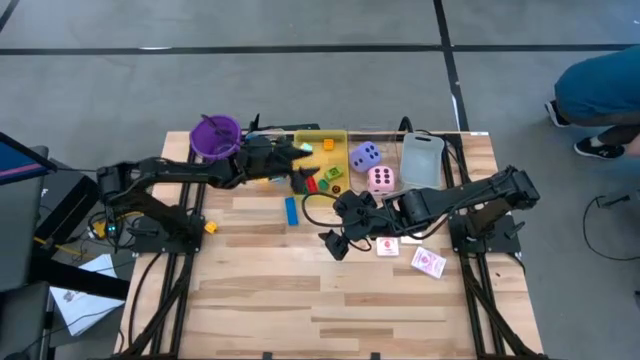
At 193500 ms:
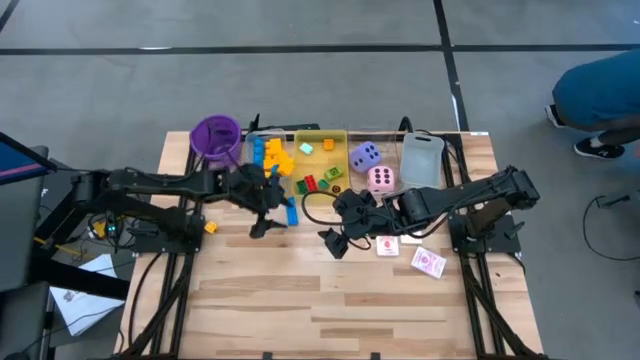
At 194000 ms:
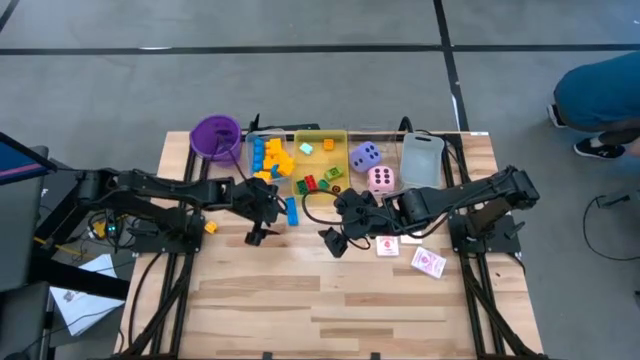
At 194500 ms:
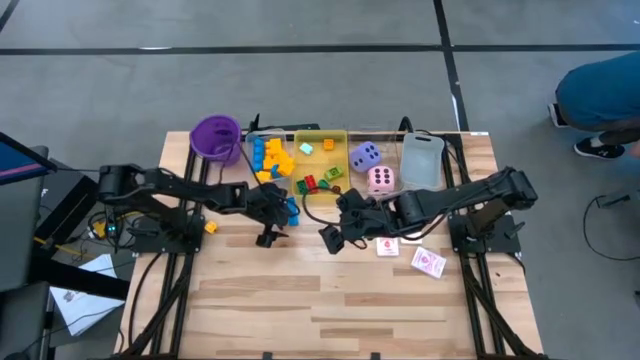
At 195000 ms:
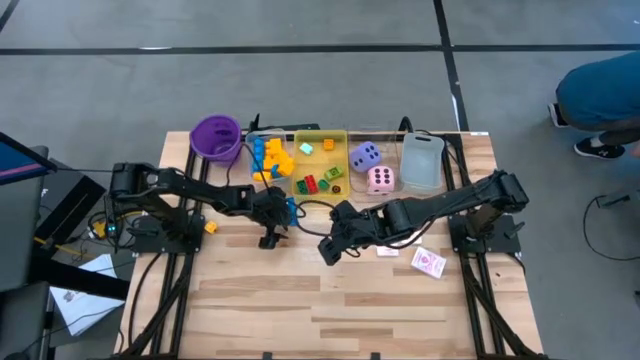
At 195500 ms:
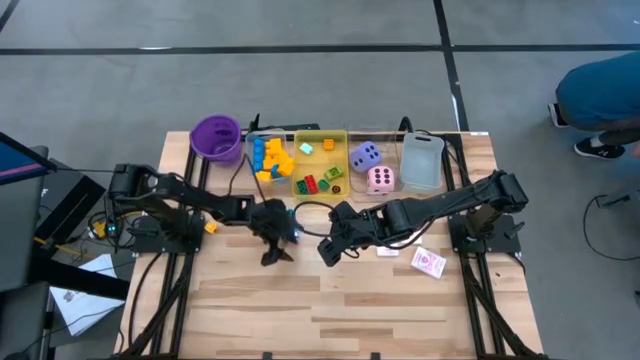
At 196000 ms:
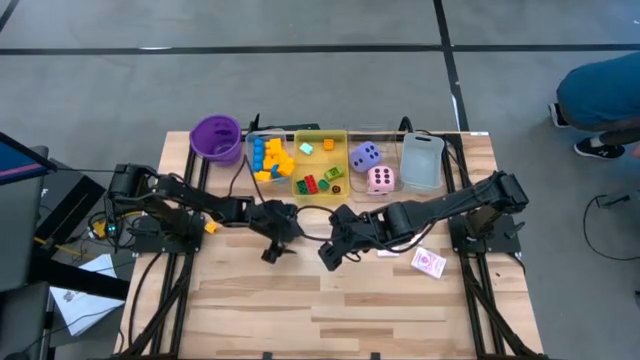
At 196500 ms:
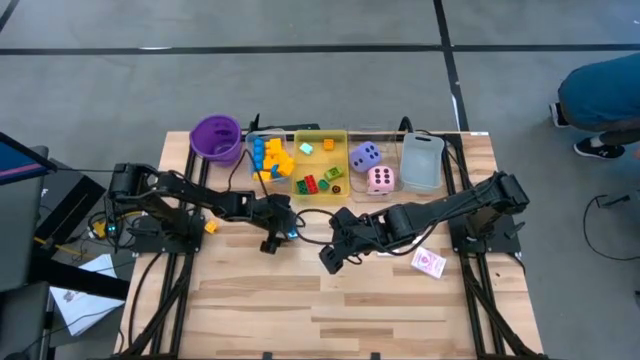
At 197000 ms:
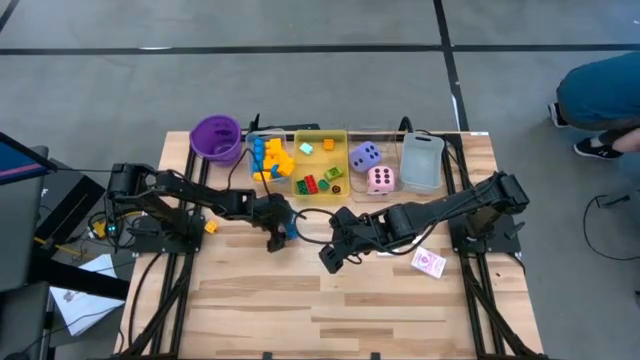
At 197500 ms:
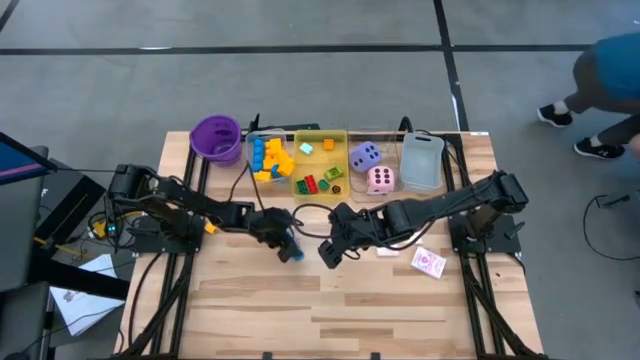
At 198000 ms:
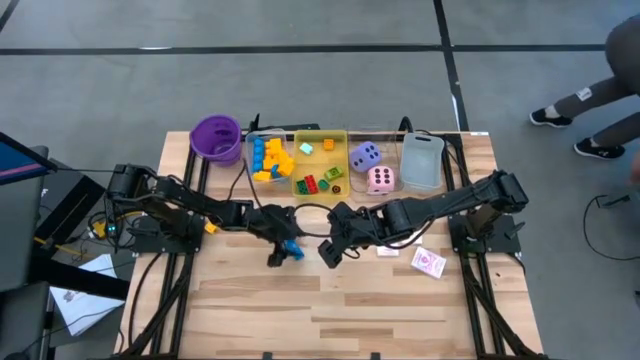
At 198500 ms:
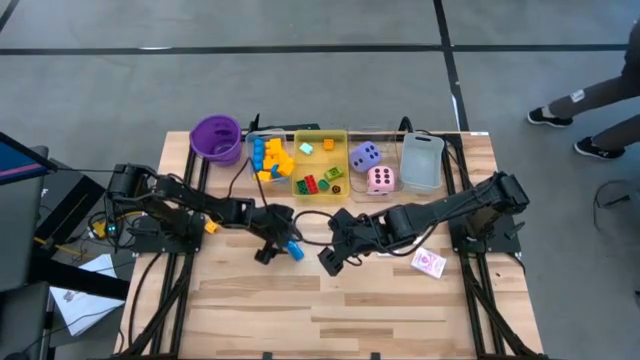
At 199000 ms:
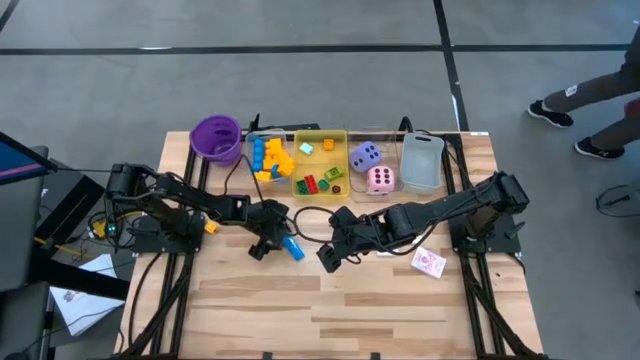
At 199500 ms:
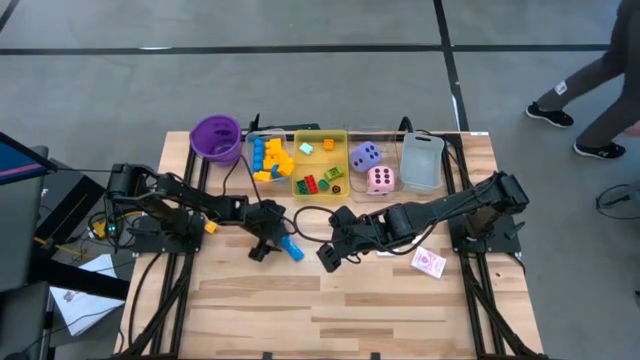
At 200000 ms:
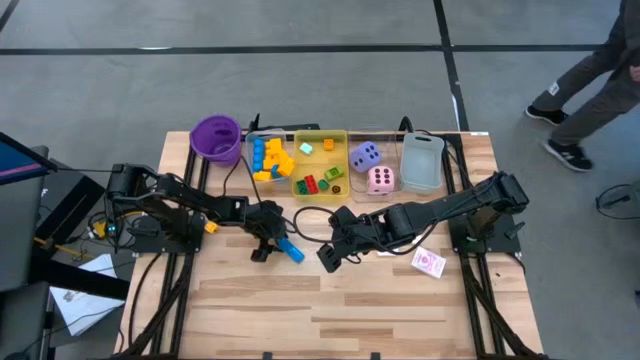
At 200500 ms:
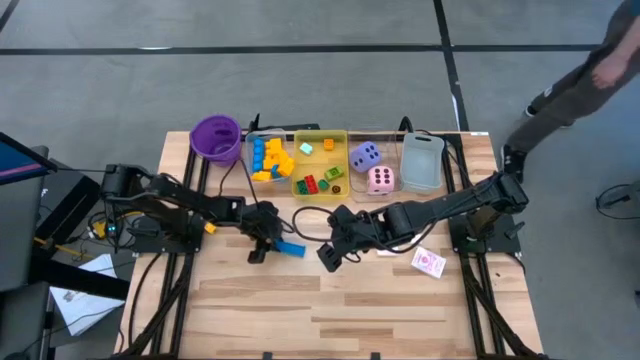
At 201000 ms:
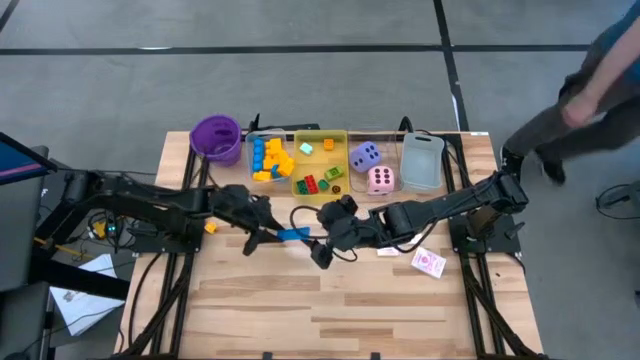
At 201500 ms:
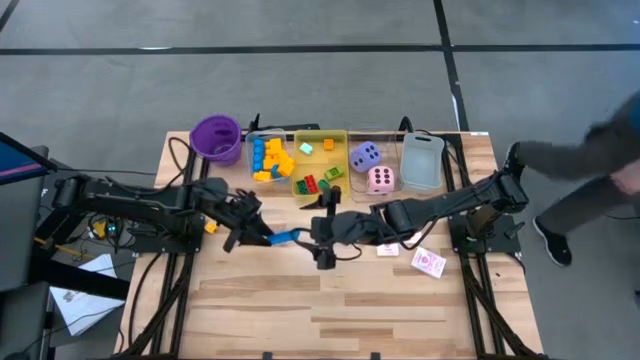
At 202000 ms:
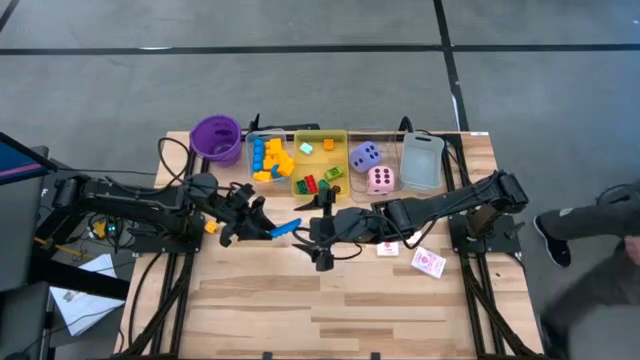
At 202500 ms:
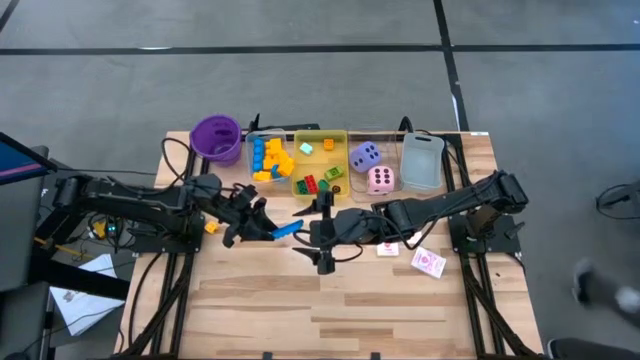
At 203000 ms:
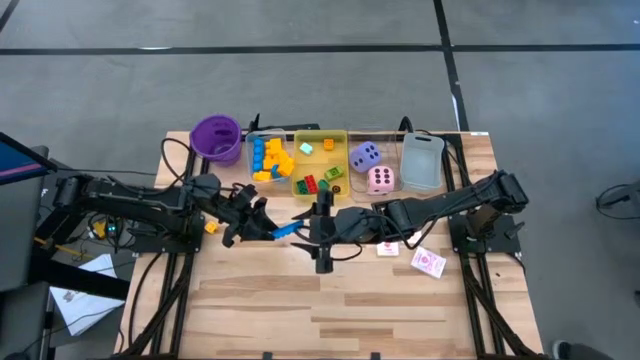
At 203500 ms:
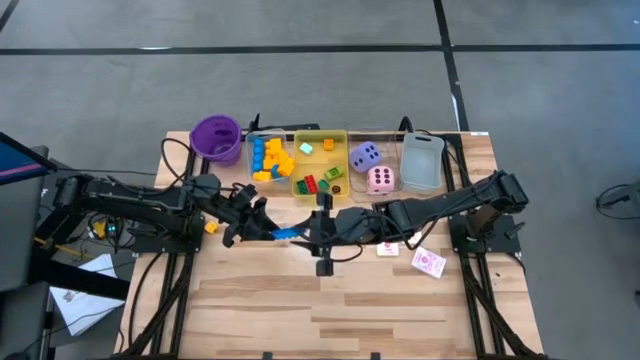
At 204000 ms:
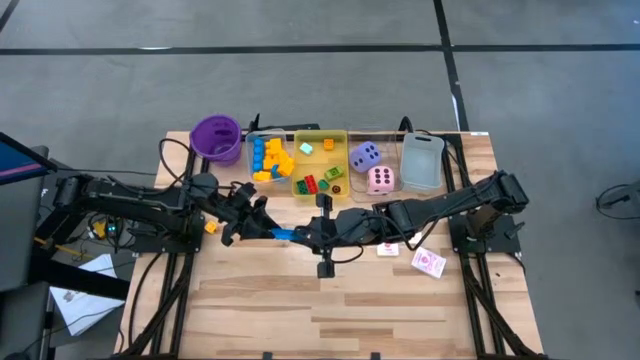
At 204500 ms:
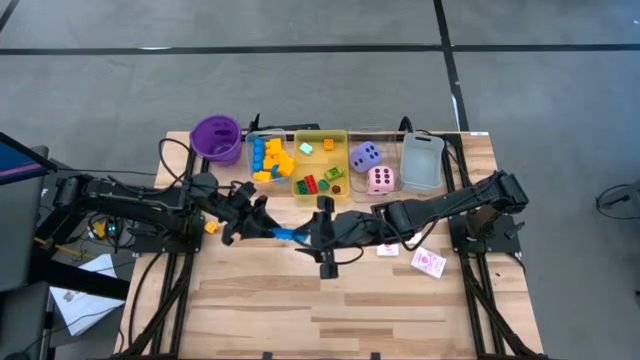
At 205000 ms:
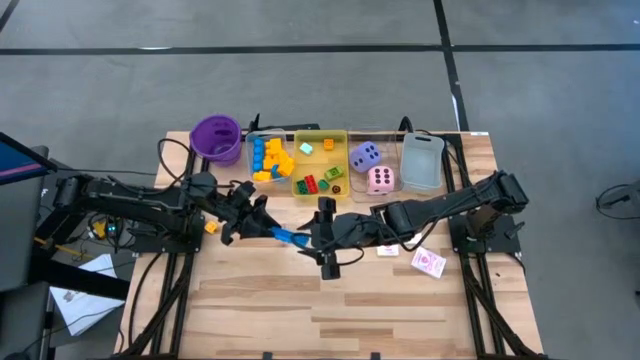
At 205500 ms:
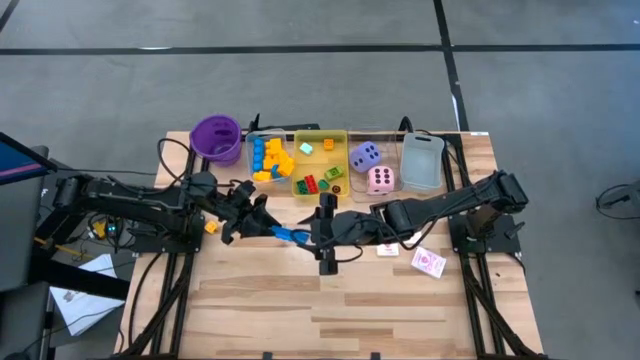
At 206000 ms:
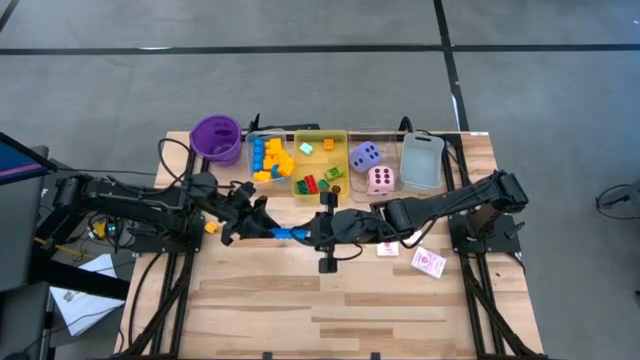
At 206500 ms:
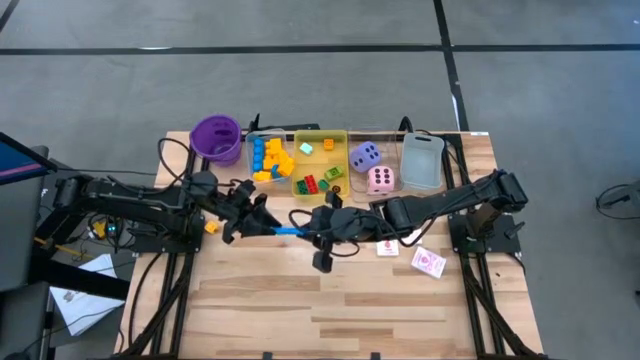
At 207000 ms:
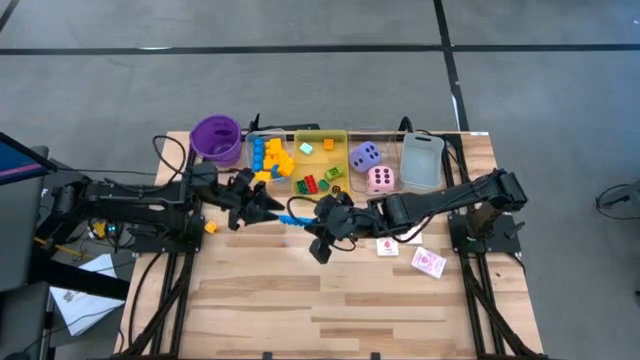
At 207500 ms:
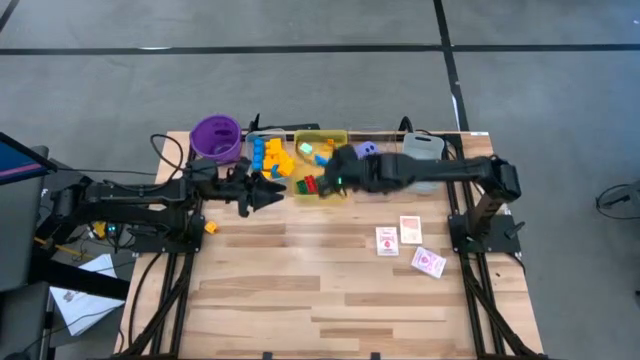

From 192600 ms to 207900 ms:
Task: Pick & Place Toys
Put the blue twelve stud game piece into the yellow bin

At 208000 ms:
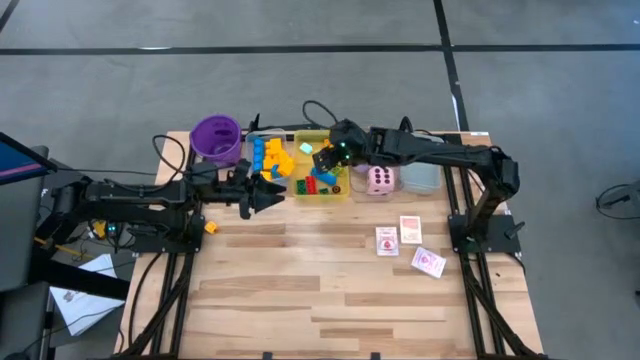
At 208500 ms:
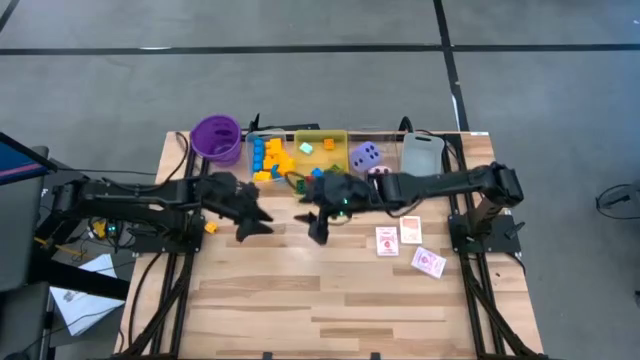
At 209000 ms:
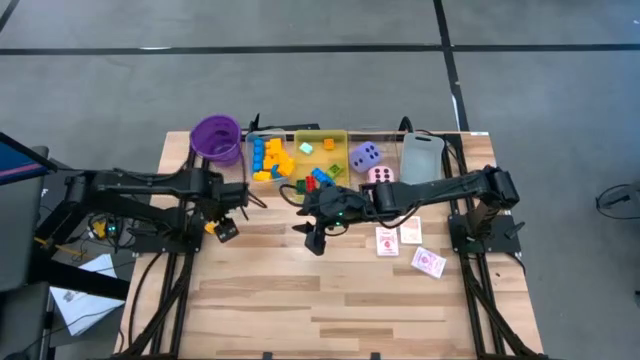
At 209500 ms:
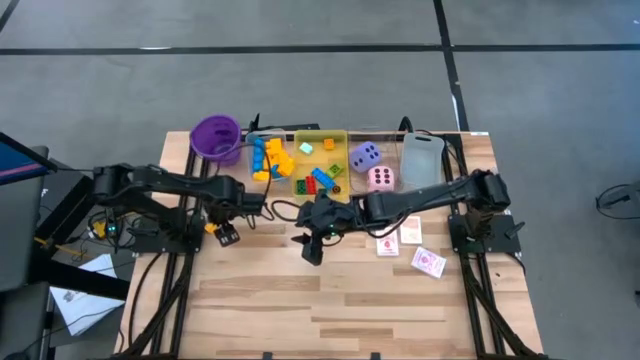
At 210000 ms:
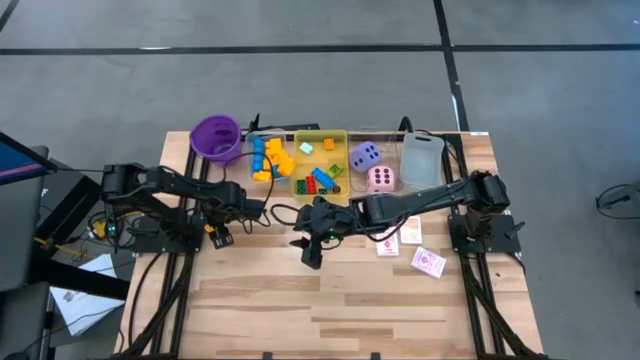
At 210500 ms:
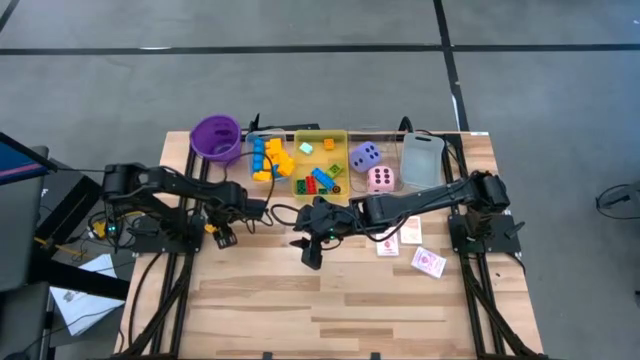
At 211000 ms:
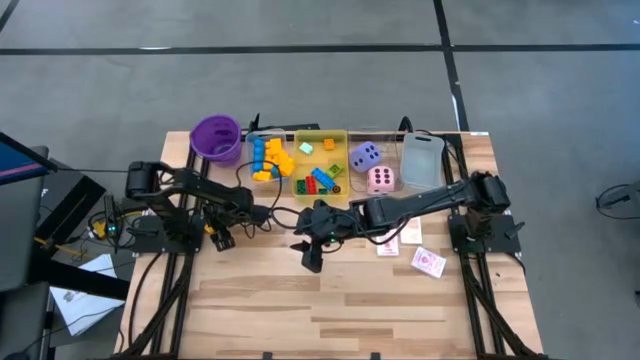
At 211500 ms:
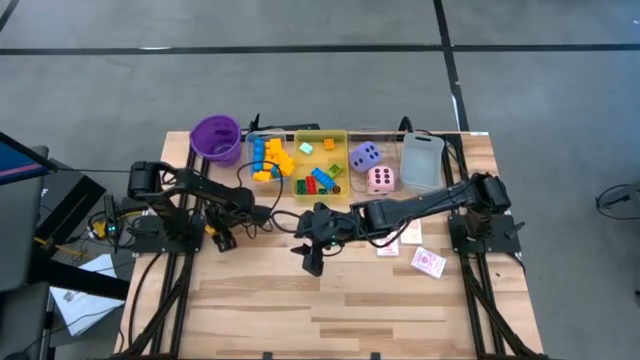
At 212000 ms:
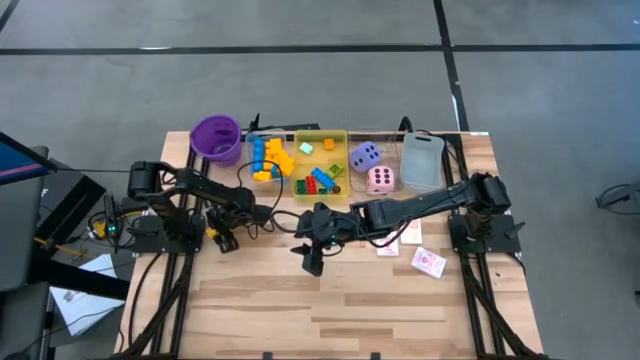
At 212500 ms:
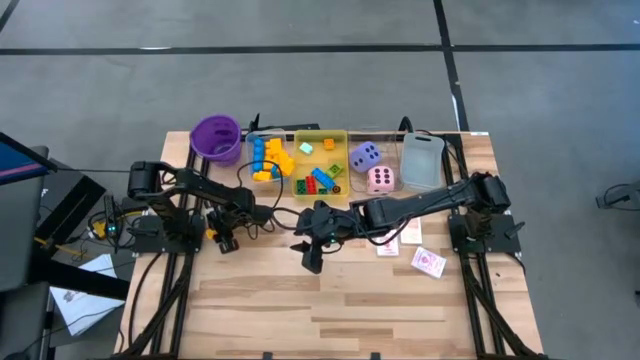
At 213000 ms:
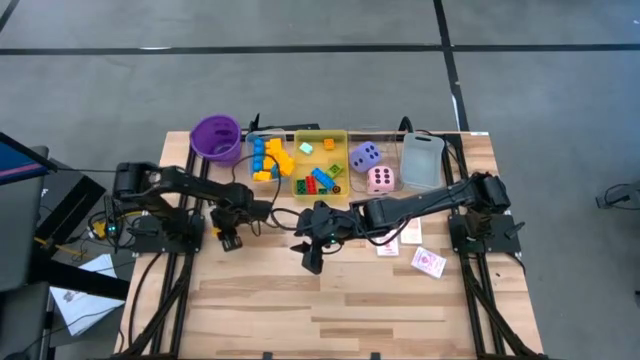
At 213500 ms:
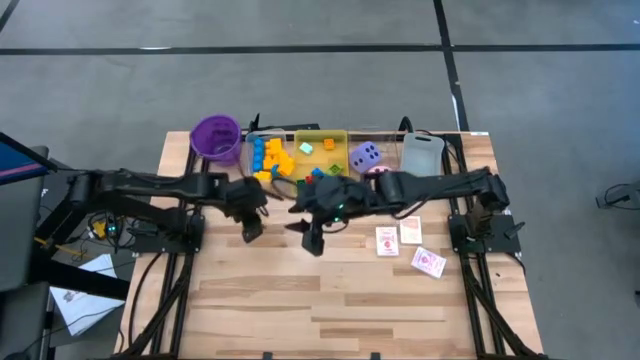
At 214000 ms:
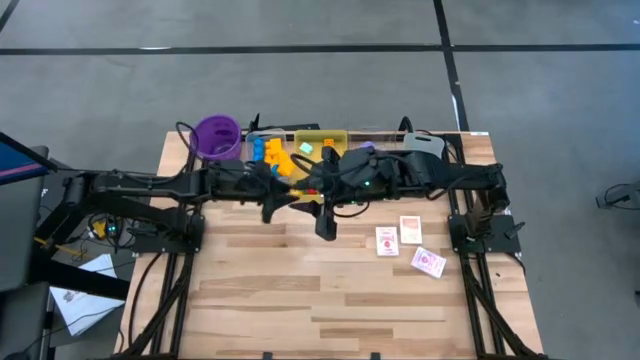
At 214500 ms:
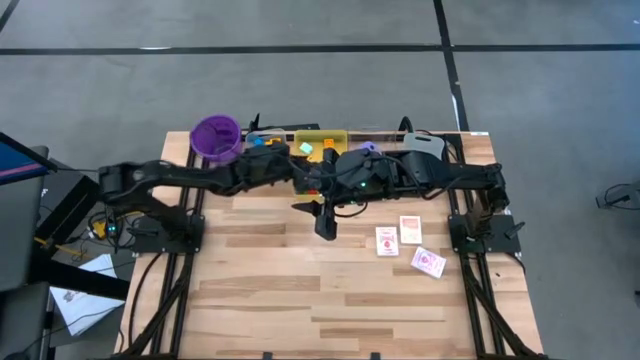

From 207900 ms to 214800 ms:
Put the yellow four stud game piece into the yellow bin
